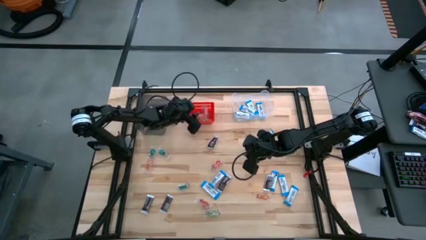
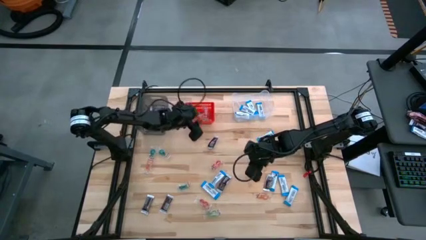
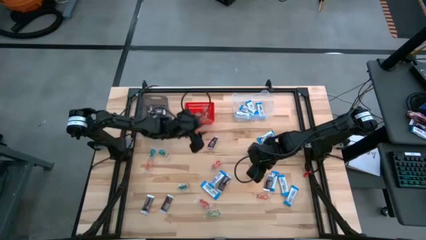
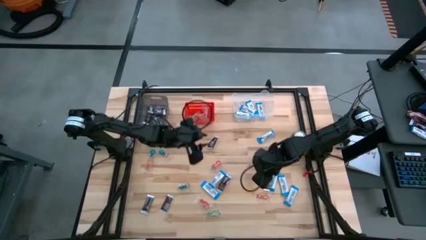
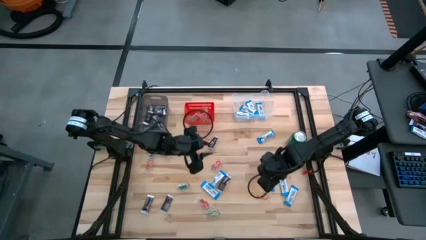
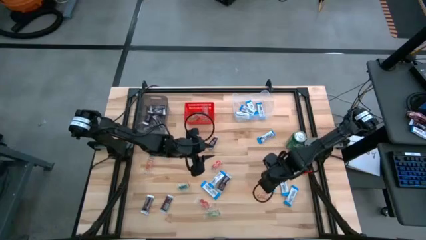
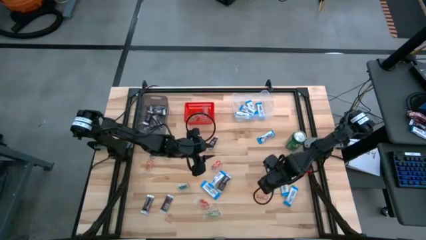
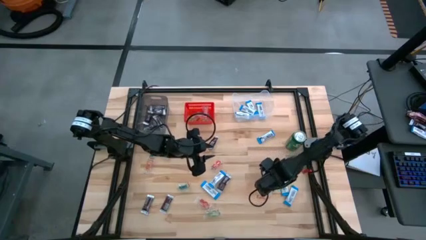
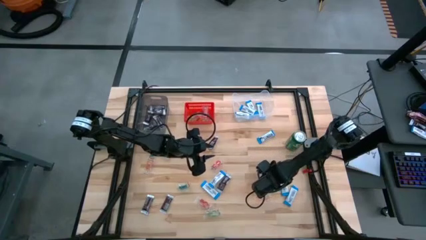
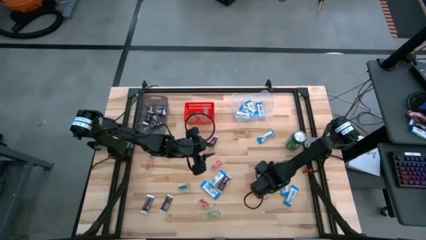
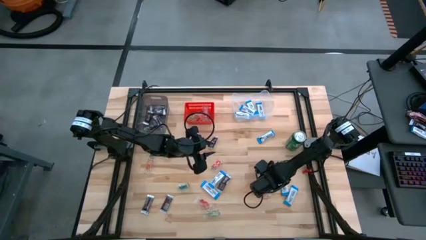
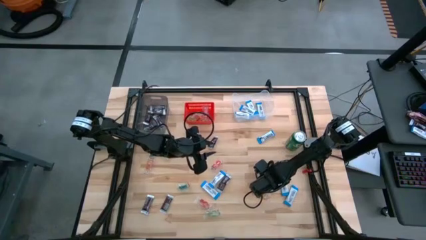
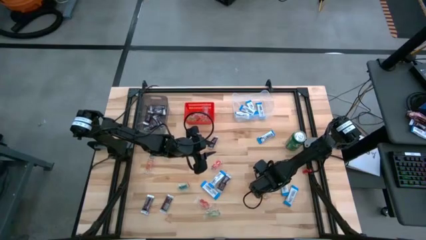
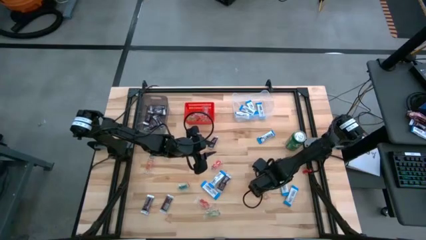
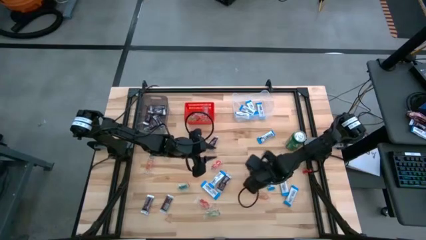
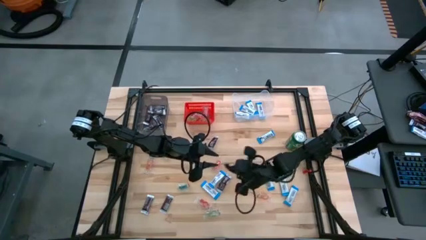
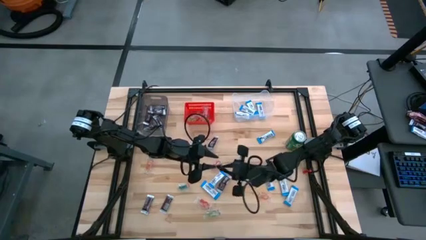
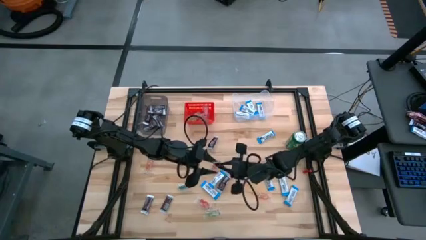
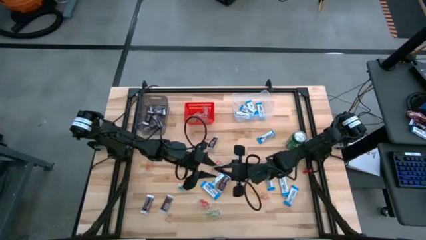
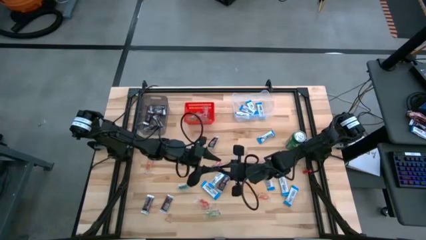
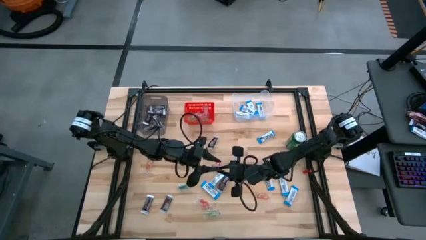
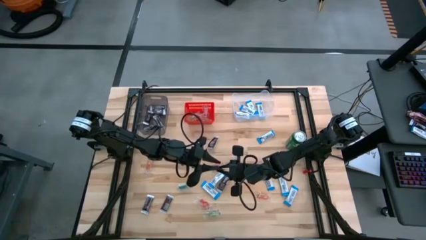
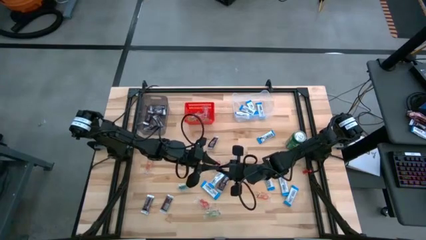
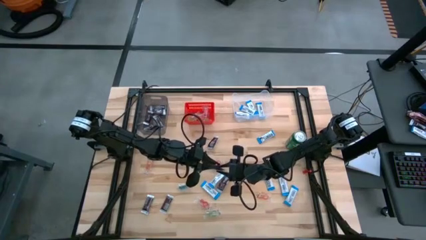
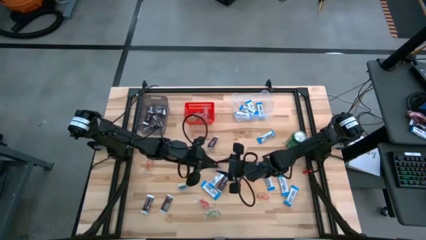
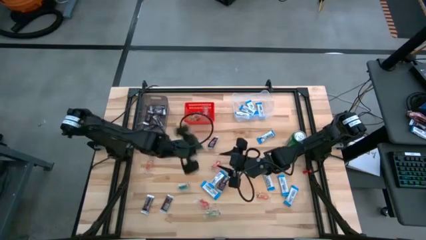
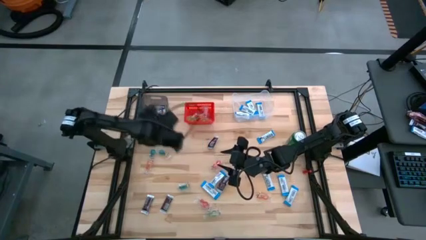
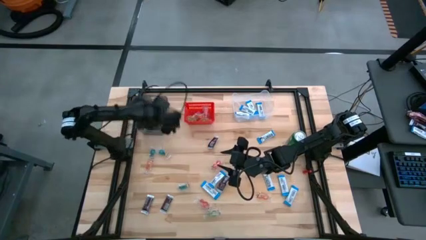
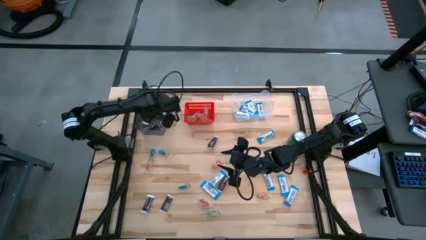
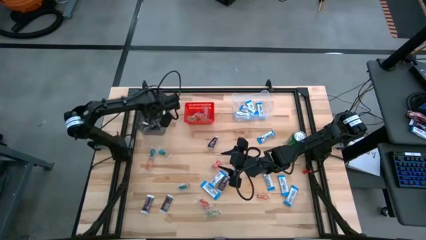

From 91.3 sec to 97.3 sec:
Task: Sort candy
Put the brown chocolate into the black bin

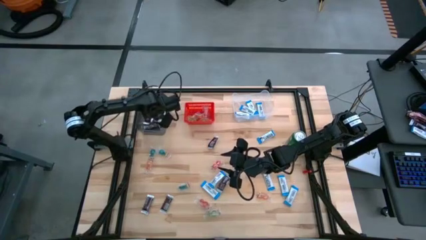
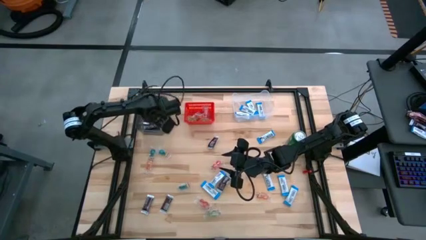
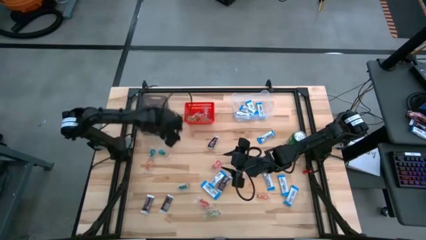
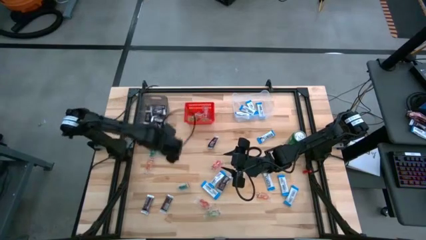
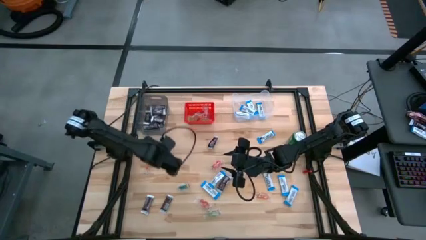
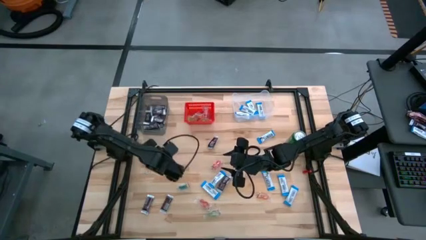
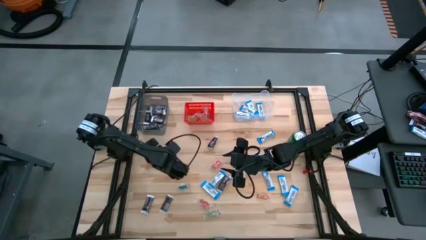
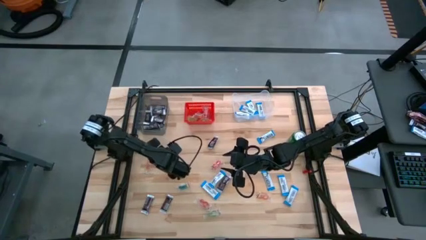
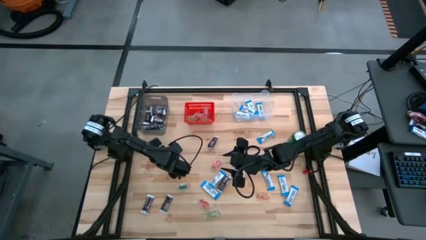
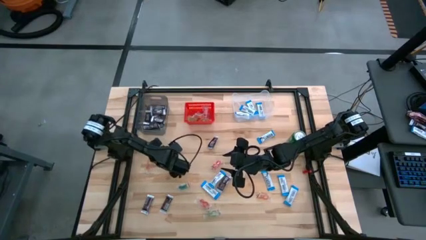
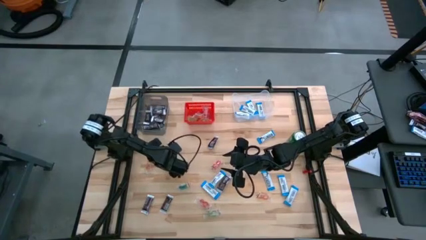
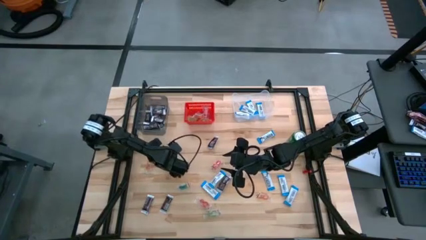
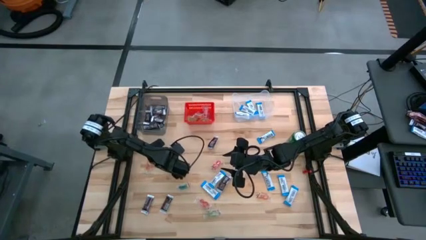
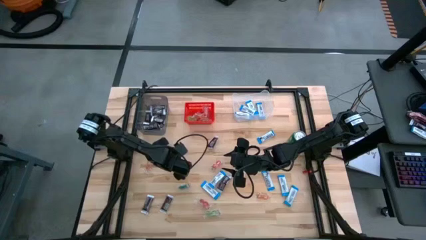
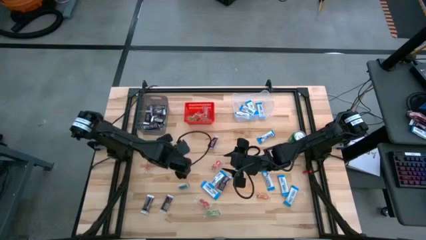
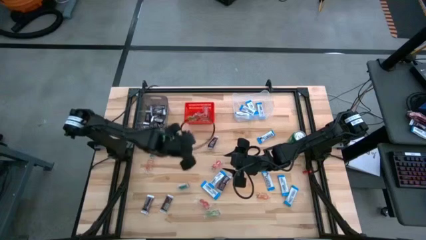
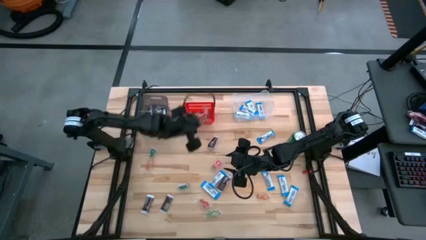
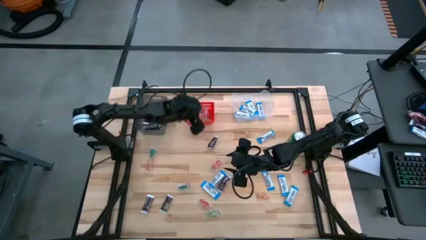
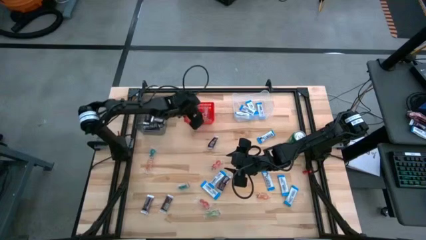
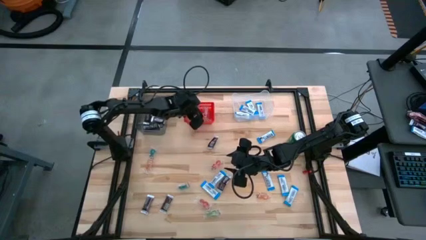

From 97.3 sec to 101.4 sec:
Put the blue gummy into the red bin

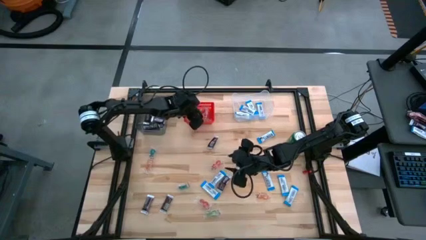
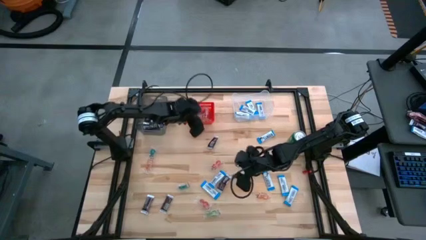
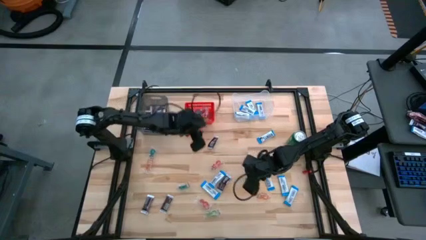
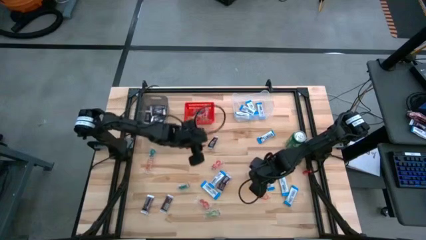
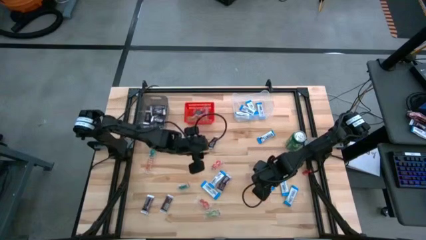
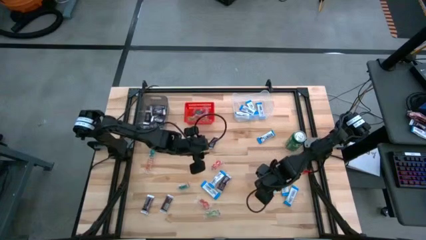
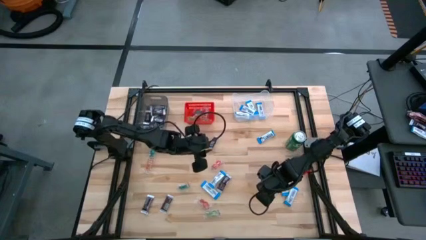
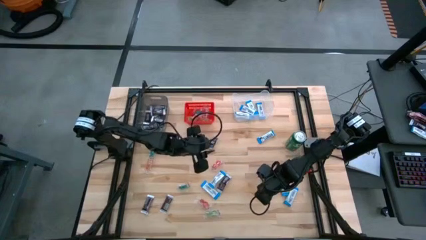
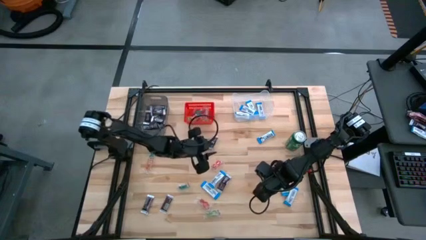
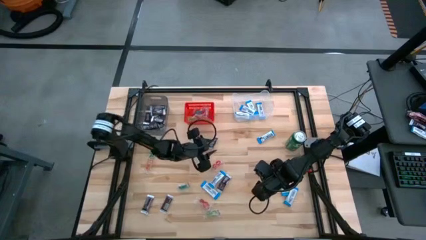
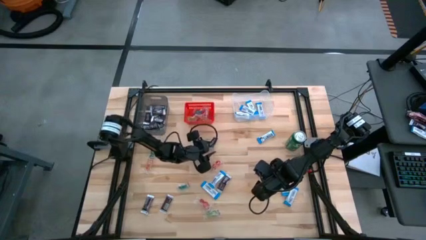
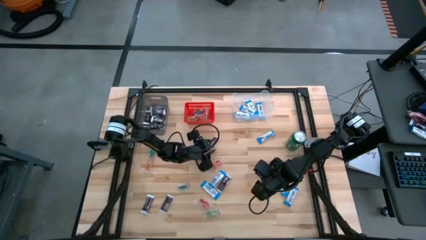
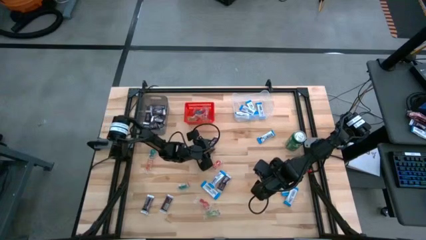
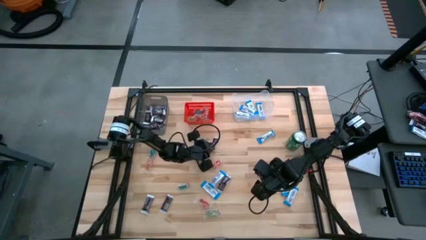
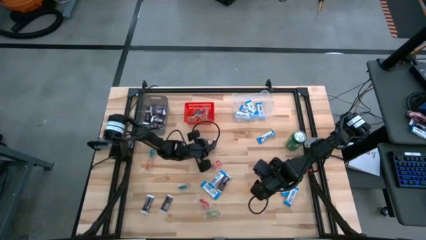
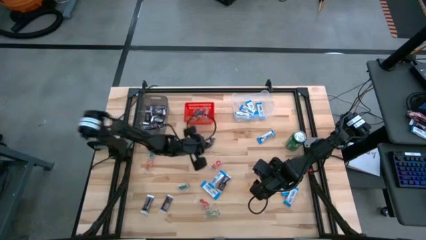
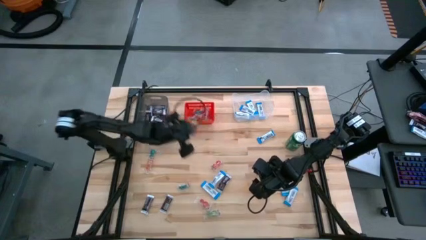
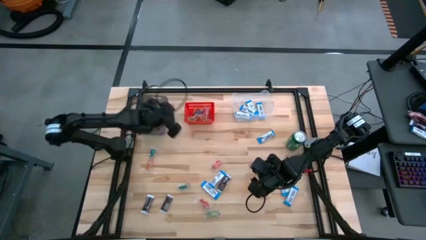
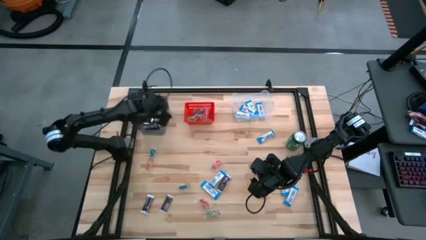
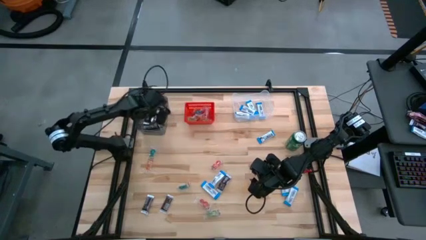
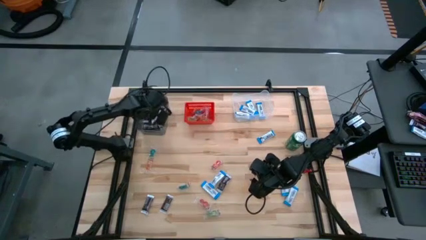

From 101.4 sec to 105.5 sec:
Put the brown chocolate into the black bin

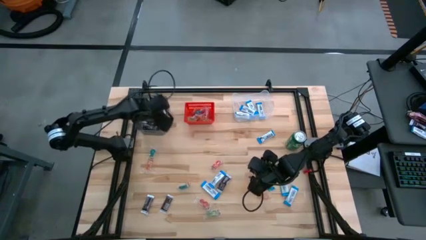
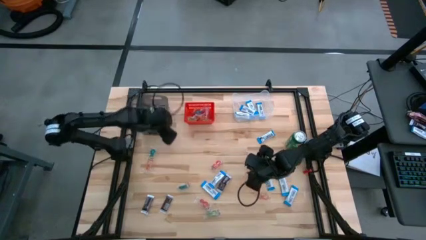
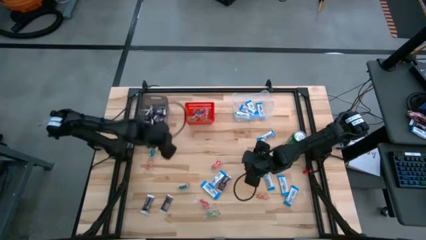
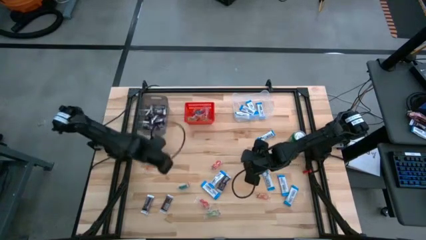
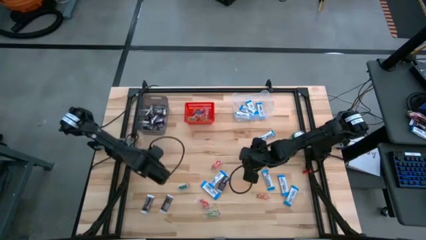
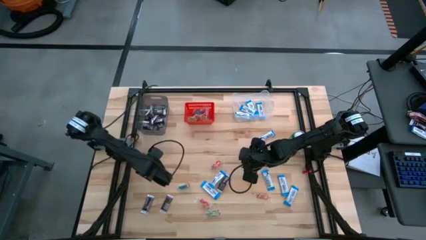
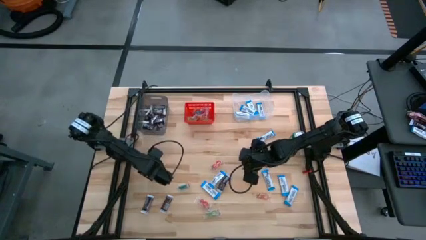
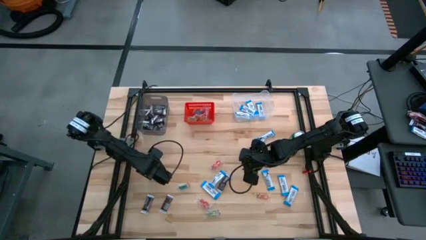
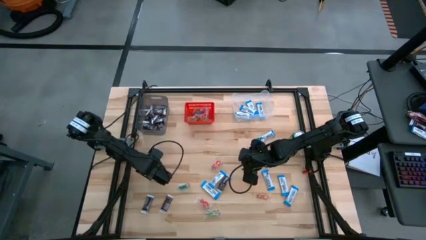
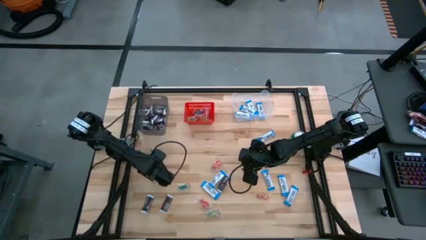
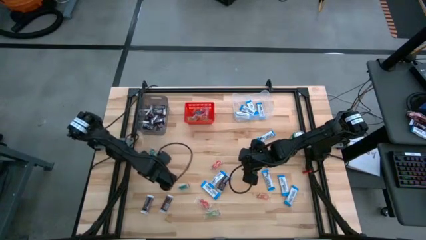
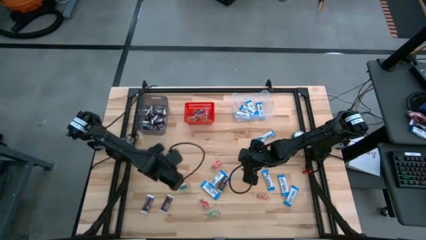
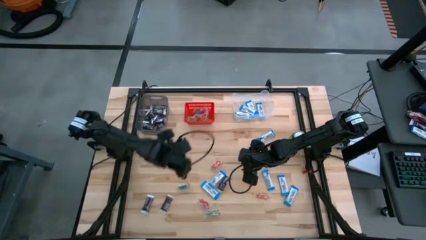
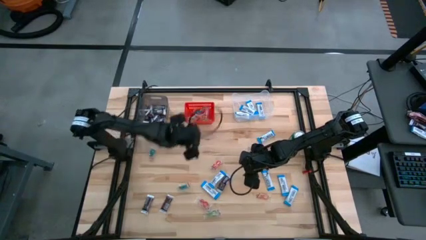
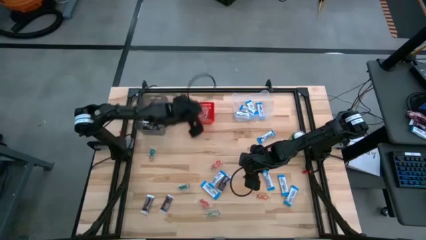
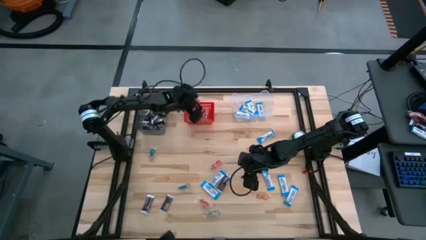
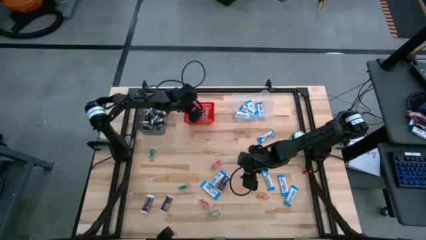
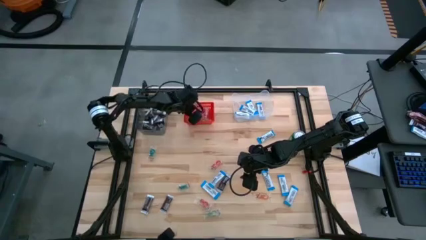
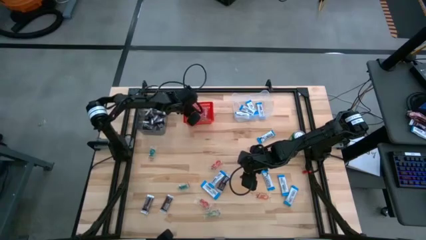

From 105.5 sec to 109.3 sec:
Put the orange gummy into the red bin
